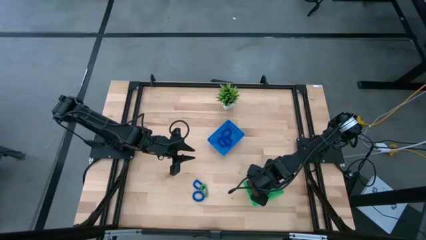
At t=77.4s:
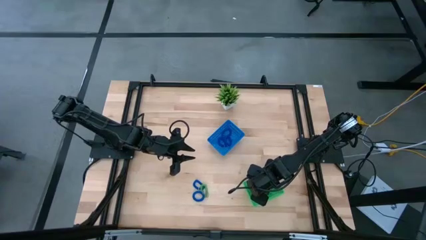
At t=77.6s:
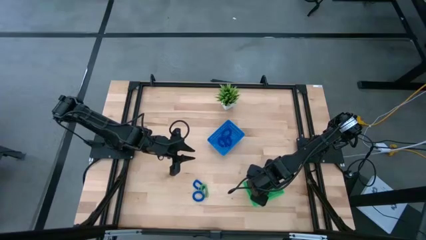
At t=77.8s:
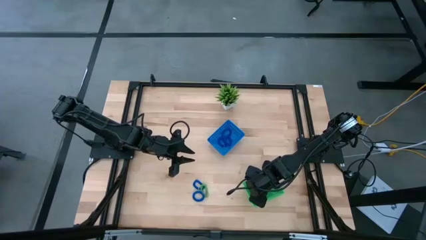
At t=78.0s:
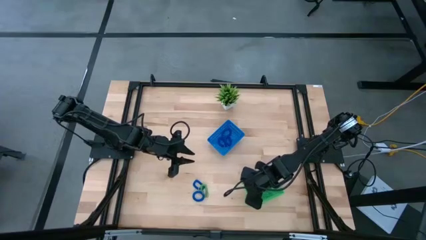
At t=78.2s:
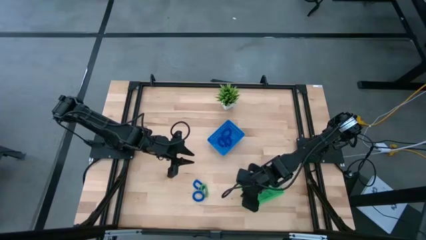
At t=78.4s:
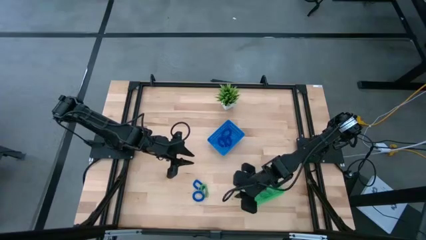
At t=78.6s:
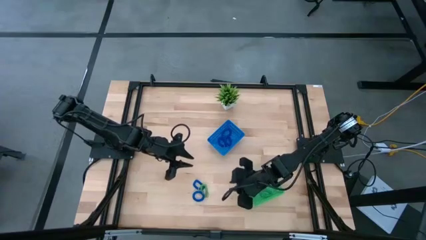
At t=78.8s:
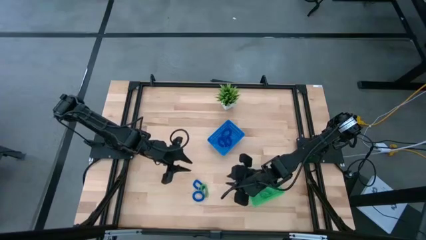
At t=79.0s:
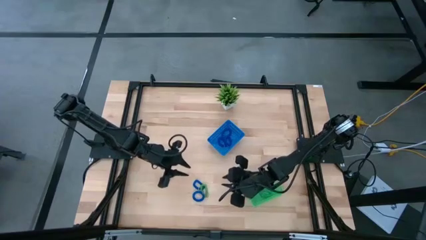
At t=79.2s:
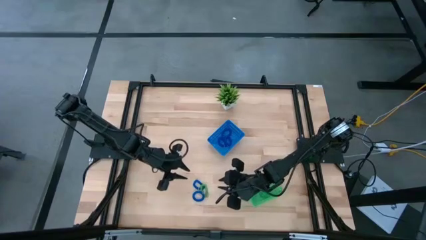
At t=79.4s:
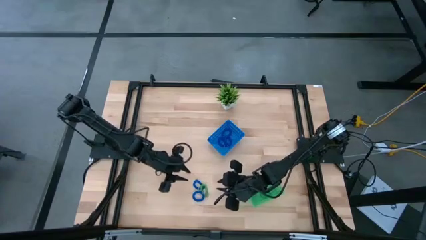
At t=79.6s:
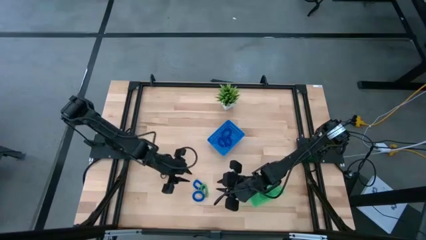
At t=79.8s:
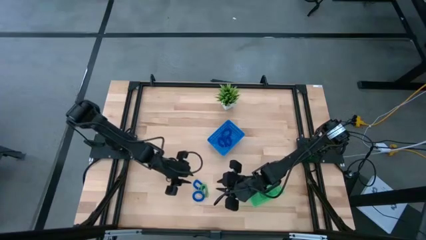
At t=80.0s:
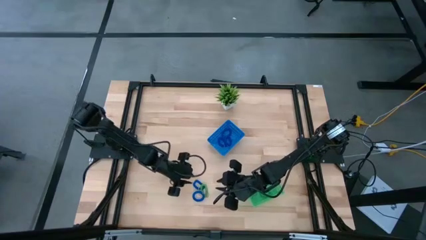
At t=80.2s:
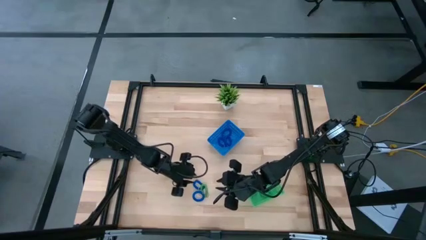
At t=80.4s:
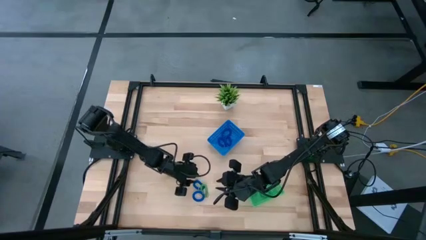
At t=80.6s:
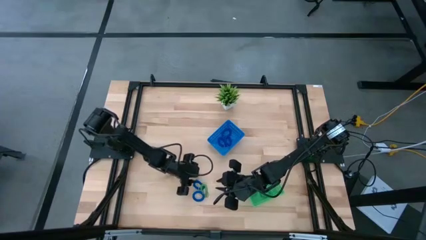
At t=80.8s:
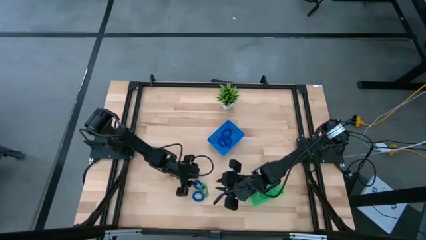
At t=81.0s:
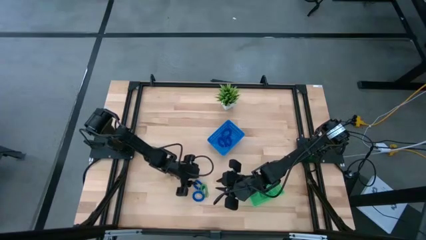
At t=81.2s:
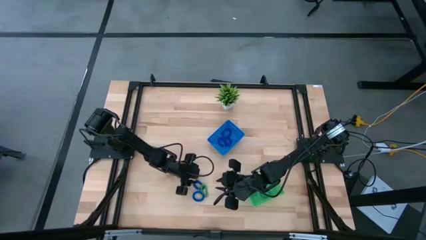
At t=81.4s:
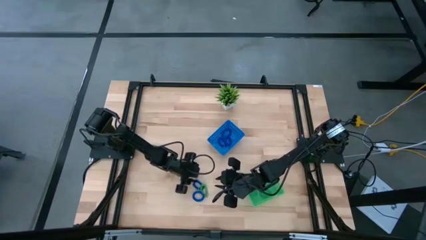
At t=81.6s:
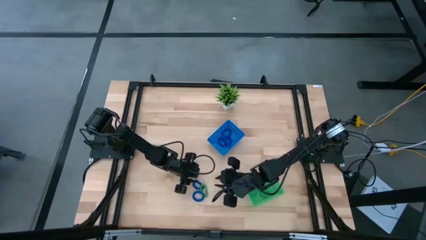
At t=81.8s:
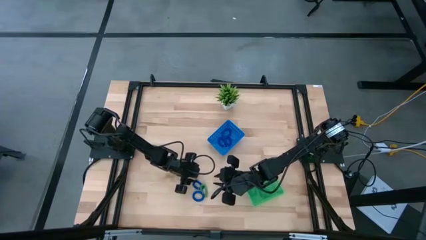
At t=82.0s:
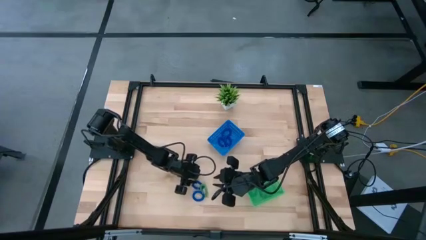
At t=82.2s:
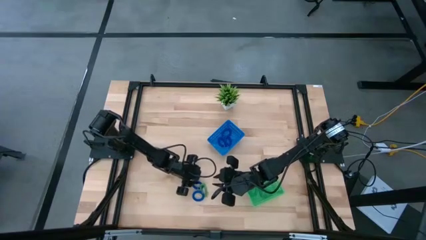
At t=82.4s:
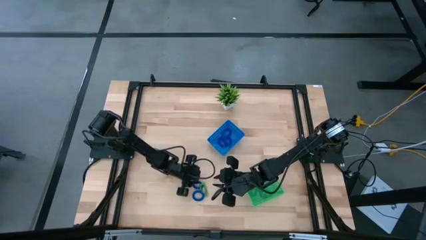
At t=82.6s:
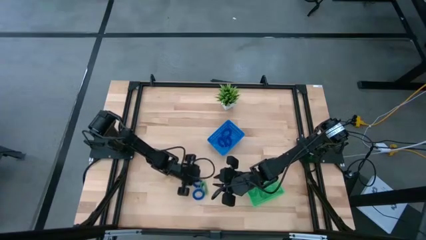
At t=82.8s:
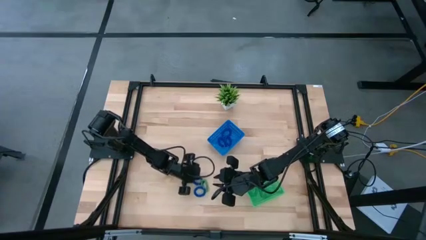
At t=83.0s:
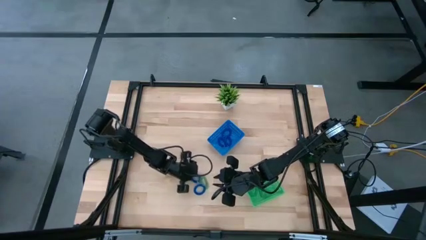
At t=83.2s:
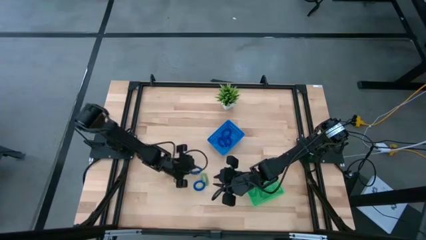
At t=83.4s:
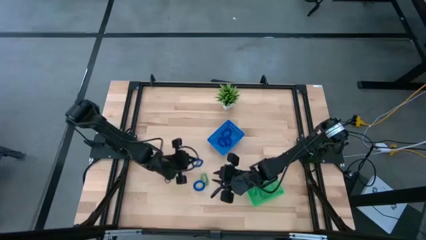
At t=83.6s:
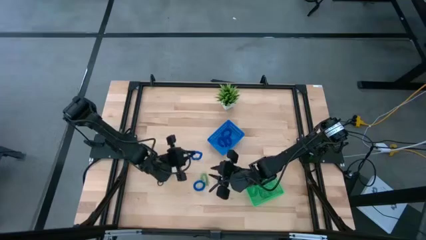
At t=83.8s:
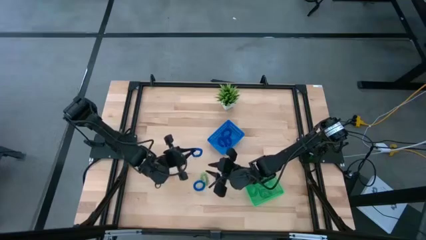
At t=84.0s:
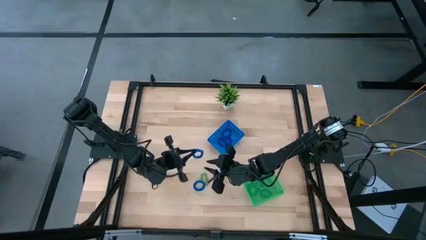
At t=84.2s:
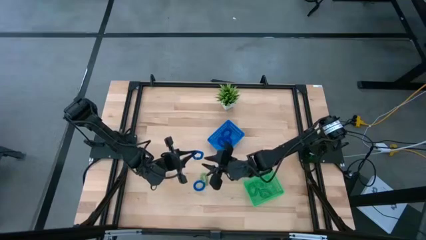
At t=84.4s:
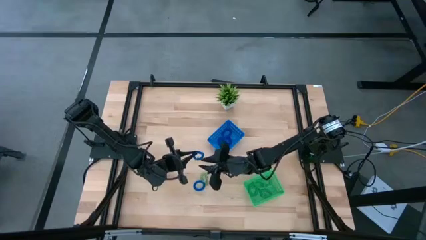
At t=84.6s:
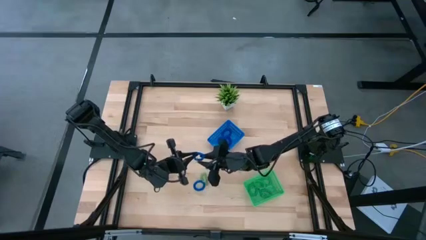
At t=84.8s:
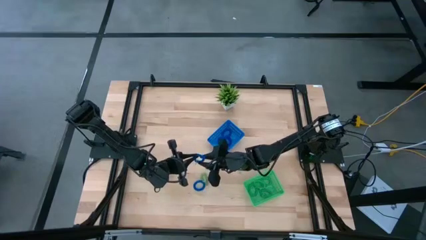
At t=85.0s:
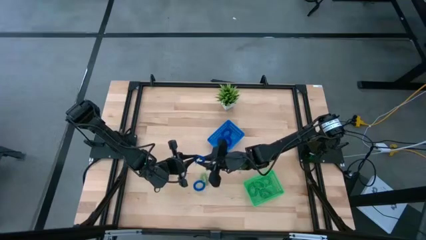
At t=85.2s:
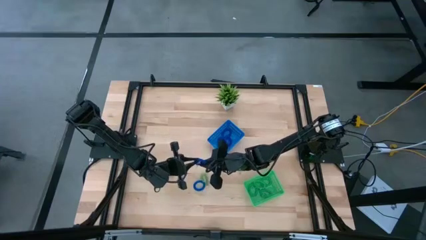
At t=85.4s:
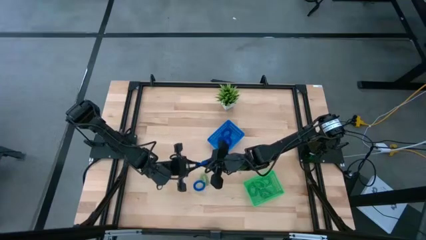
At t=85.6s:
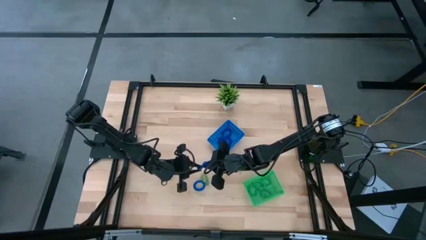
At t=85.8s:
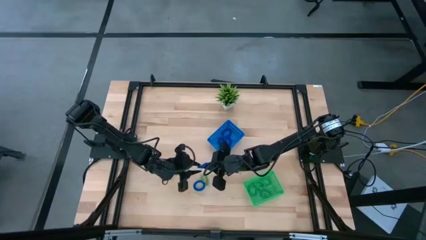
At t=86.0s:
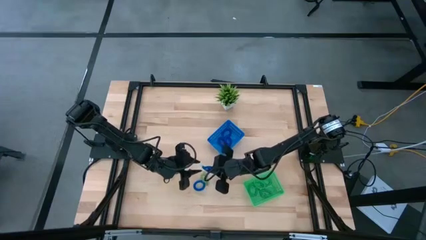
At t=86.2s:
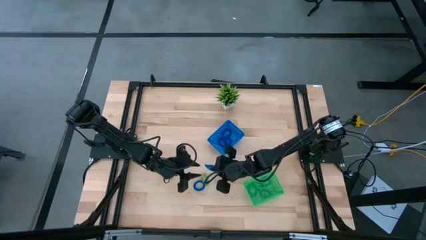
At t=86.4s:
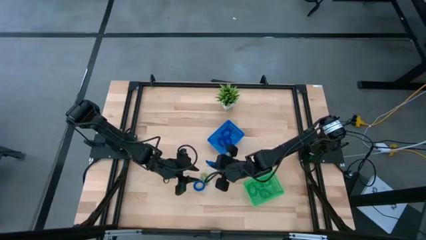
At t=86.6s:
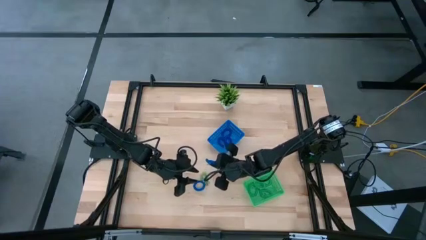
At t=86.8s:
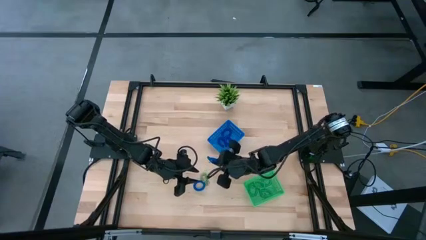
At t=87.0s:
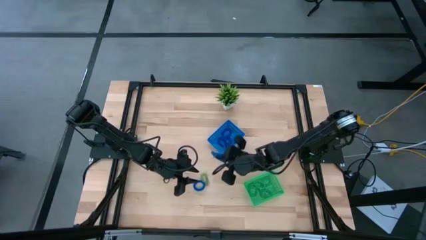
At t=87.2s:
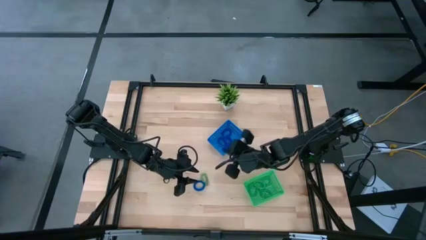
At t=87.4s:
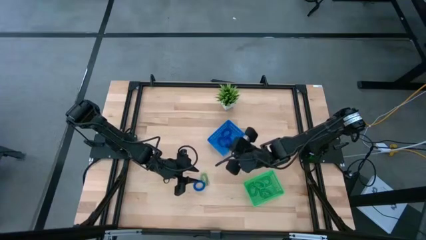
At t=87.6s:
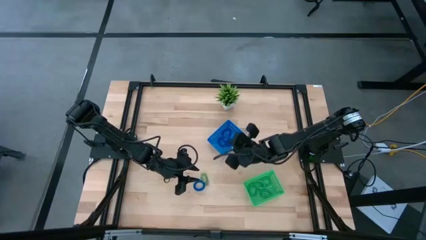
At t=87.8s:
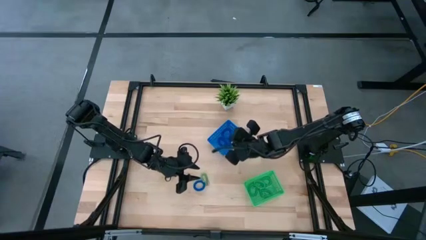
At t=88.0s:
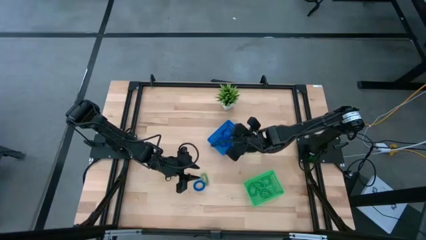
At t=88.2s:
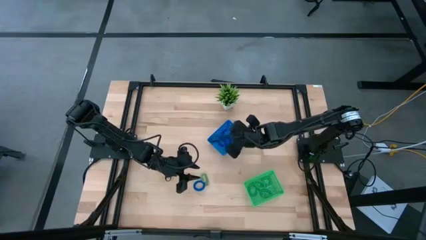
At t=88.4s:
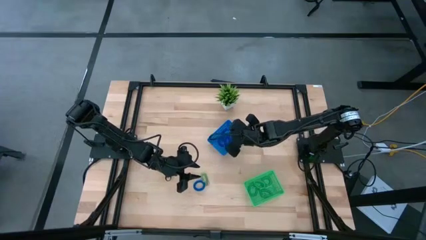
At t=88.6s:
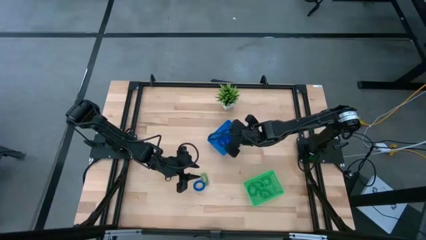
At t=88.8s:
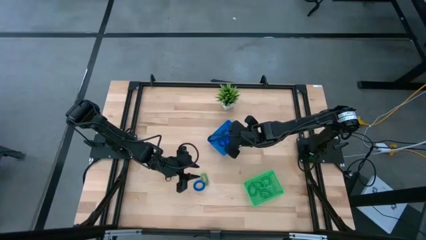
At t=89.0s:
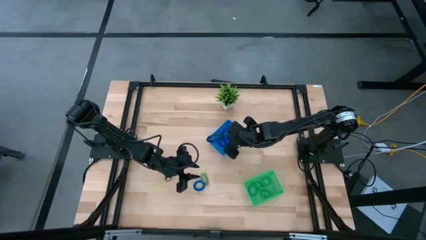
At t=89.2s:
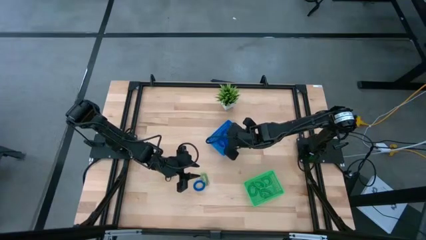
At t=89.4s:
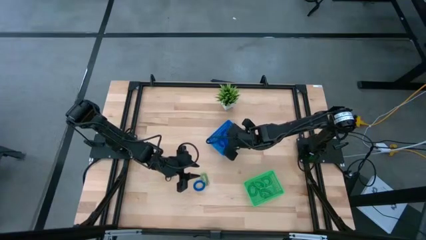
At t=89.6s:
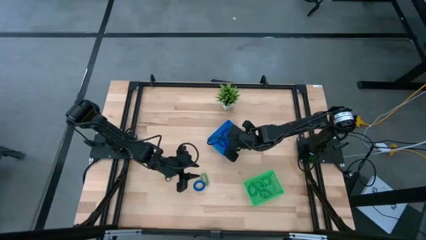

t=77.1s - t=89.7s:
Task: Sort spring keychains
Put the blue spring keychain into the blue bin
